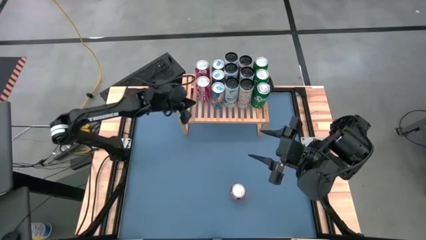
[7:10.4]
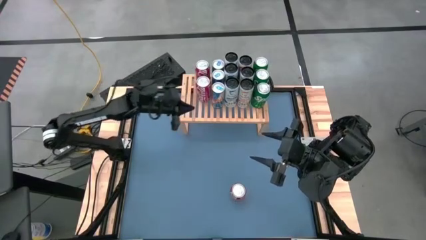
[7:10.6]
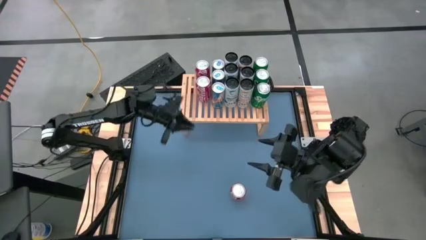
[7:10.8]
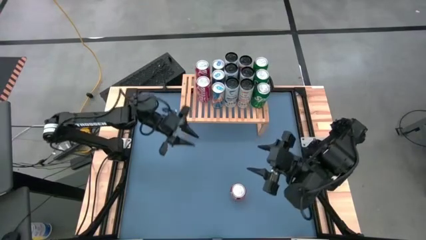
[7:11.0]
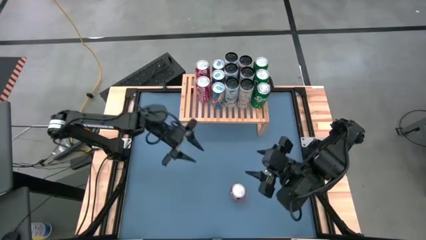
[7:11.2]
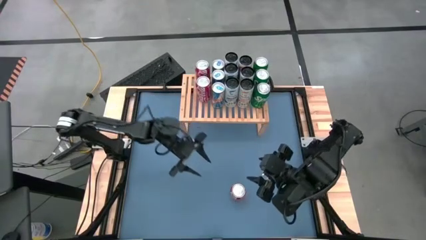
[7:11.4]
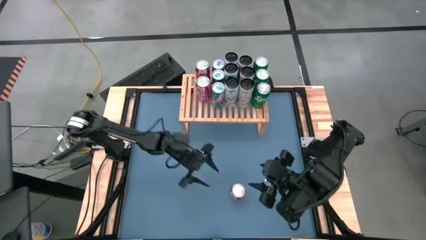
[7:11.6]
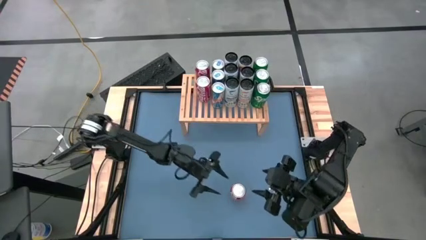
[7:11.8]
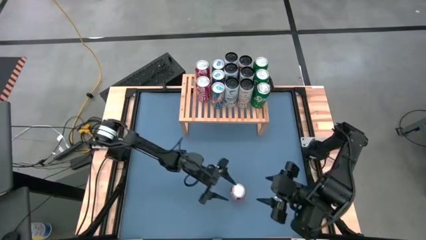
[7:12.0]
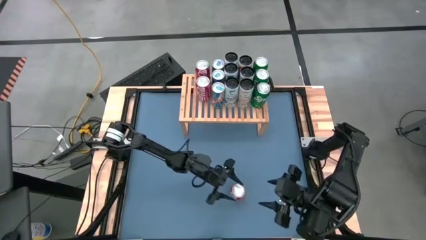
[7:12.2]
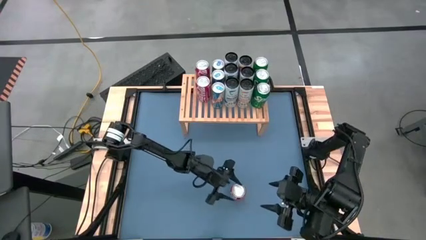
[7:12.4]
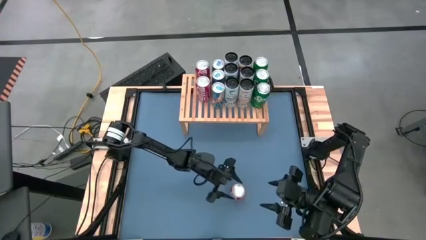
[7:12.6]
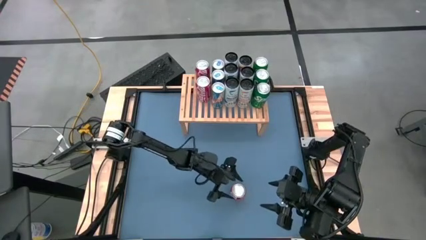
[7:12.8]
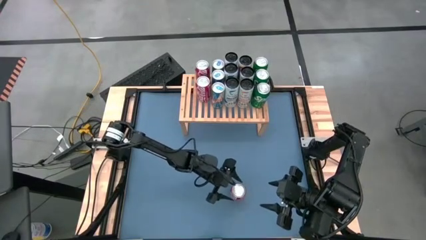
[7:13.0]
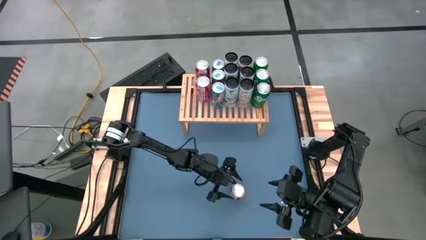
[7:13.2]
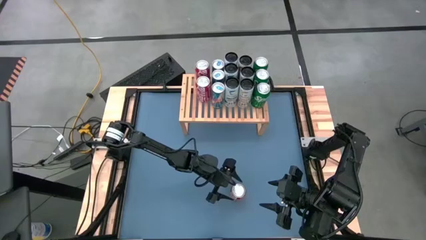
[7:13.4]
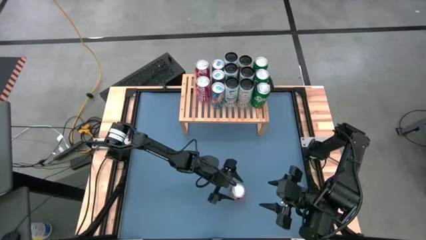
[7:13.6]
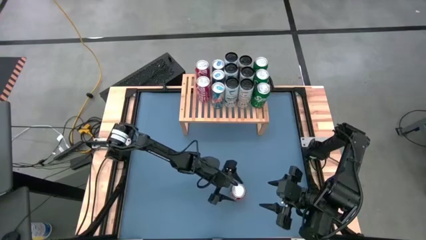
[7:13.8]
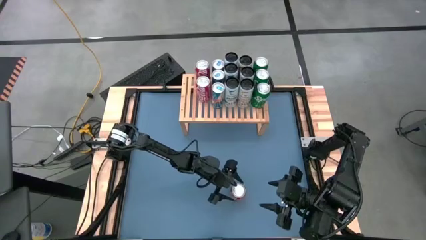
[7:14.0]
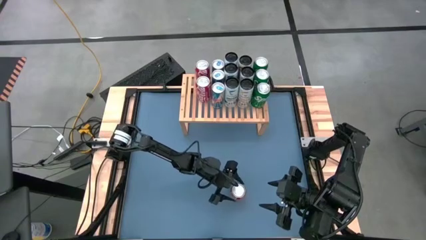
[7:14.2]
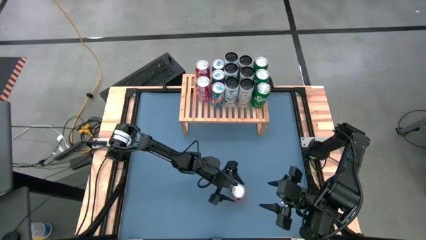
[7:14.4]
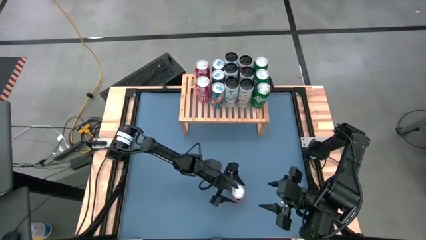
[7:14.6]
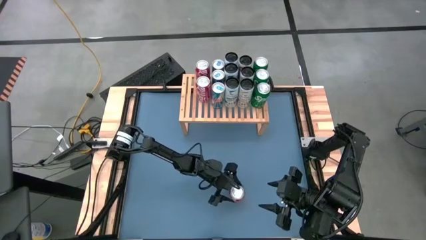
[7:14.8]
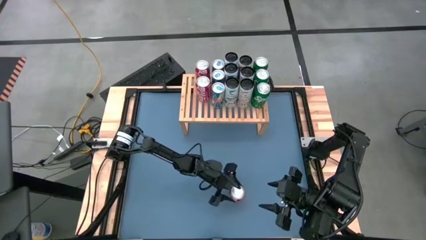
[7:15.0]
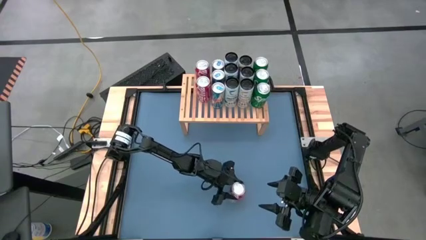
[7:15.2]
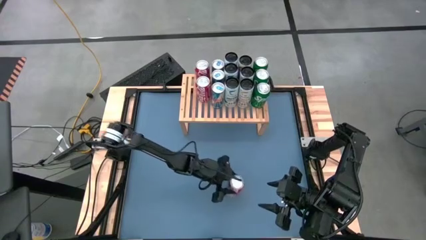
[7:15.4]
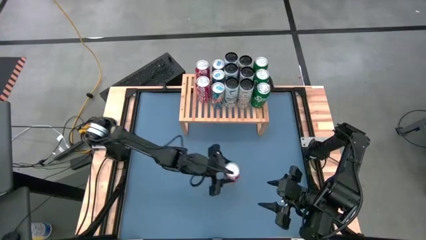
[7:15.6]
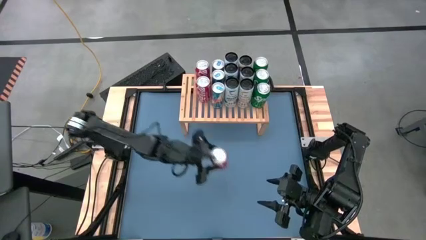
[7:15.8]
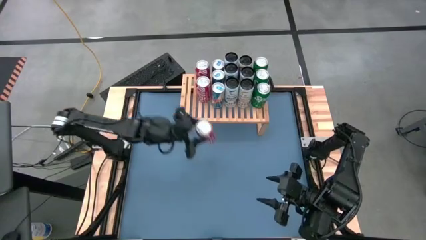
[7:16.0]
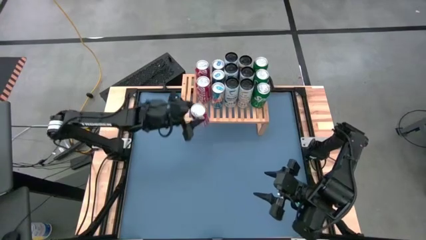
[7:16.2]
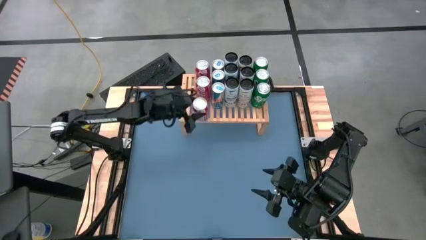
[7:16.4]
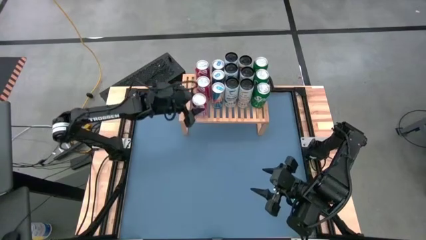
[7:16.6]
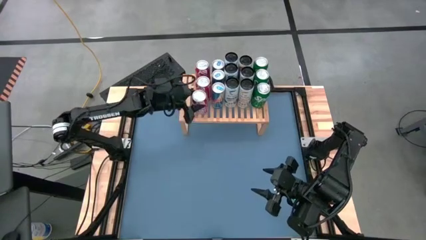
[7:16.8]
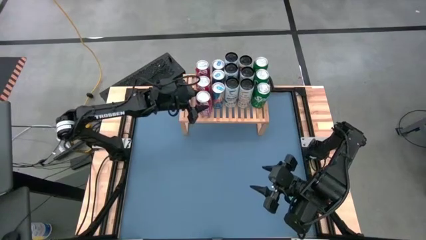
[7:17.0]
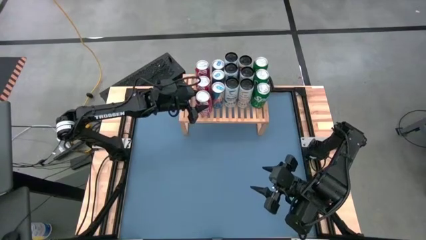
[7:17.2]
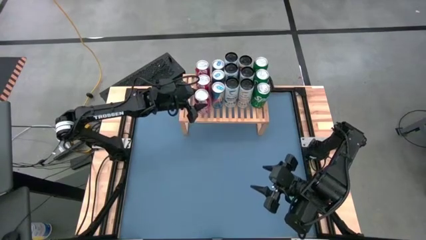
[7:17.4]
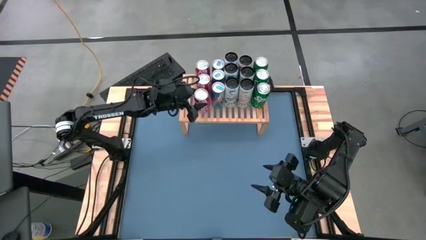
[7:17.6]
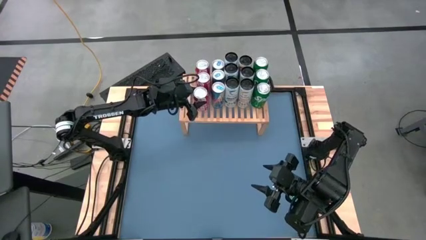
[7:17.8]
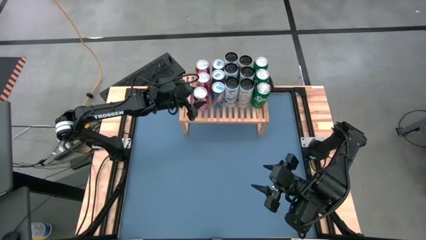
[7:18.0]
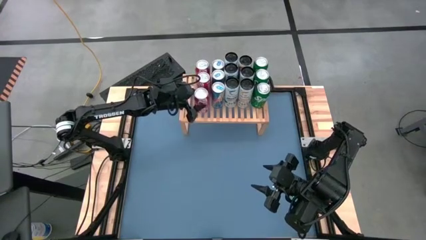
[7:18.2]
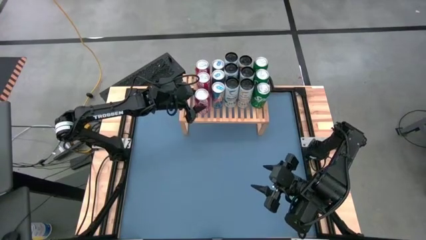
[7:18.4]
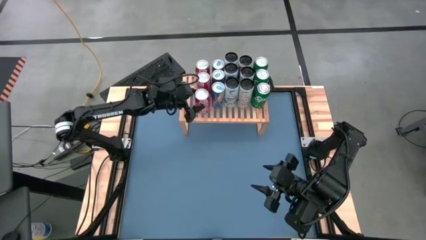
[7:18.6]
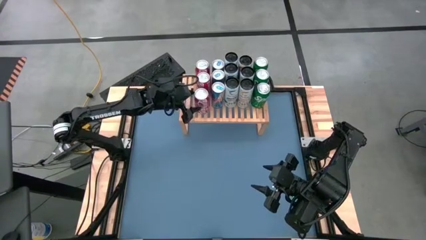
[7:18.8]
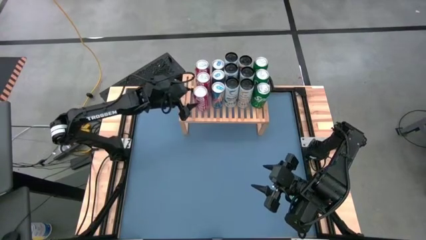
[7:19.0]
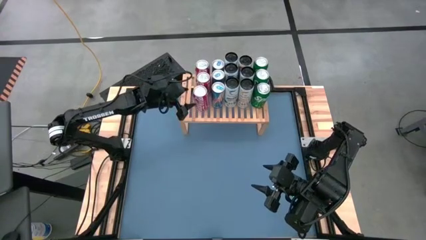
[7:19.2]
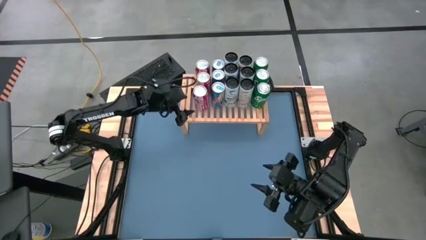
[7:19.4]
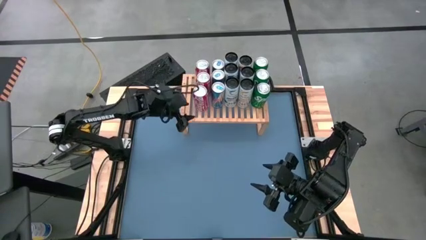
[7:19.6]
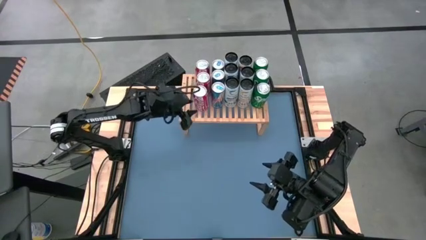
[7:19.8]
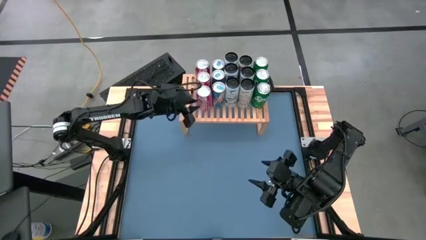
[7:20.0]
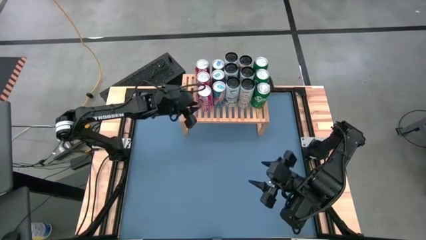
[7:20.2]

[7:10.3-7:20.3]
Task: Place canned beverage on shelf
Put the red soda can on the shelf aligned with the other red soda can

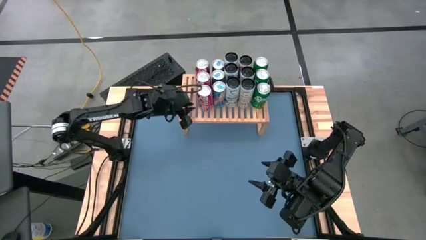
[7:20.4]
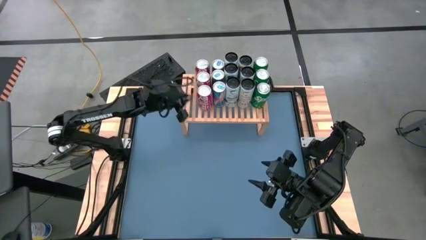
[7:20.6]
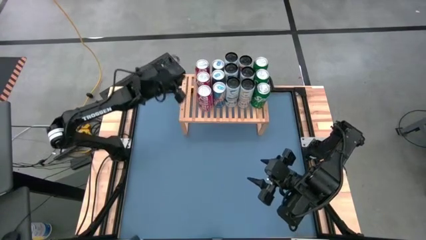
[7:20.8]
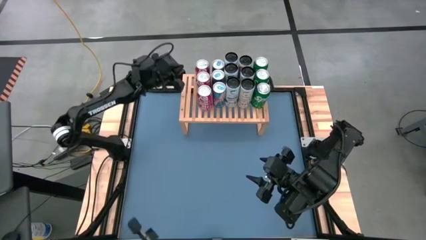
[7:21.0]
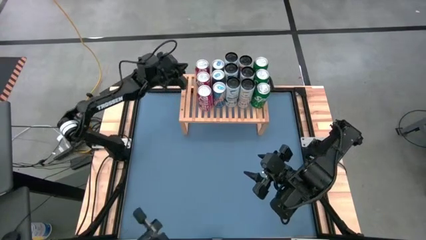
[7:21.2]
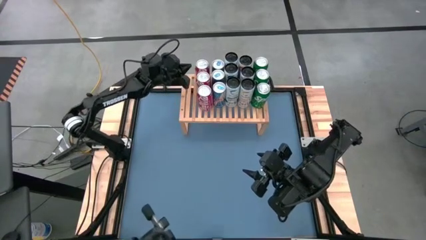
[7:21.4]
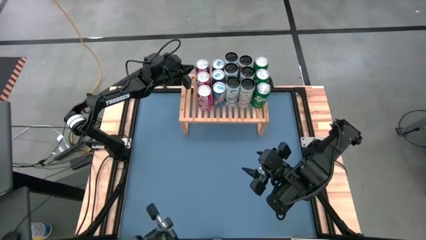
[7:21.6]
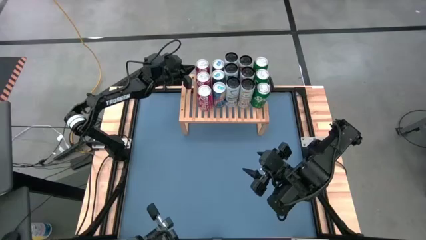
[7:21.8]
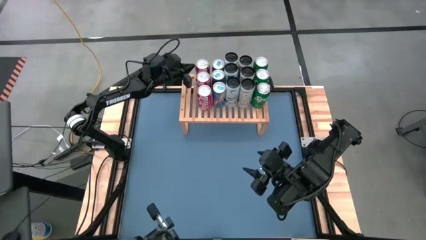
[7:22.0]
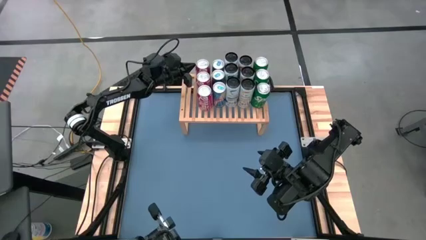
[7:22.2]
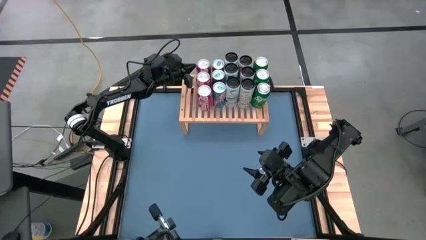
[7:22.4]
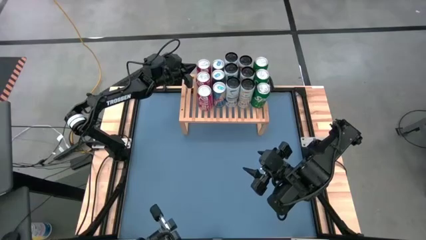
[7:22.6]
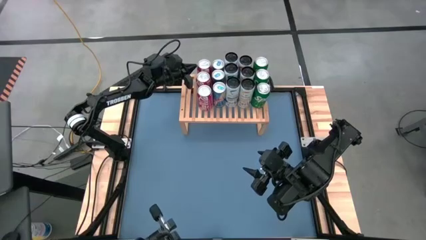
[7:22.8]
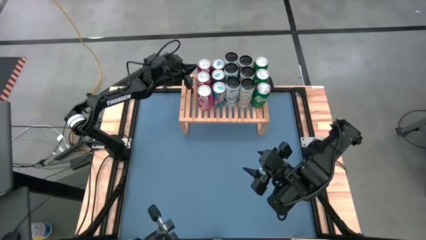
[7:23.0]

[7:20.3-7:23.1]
Adjust the red soda can on the shelf
